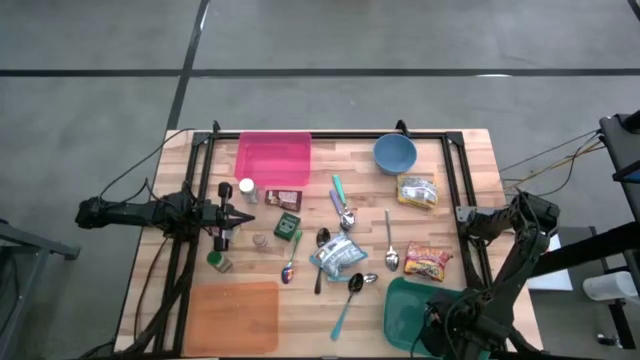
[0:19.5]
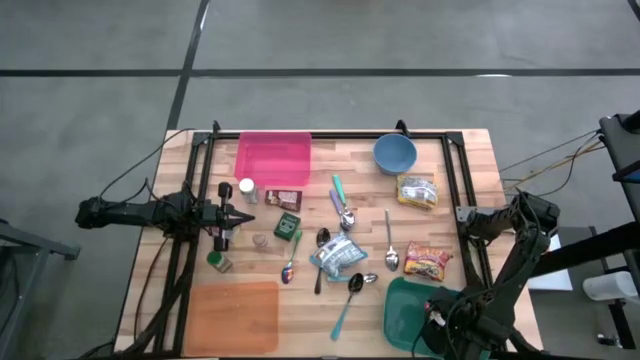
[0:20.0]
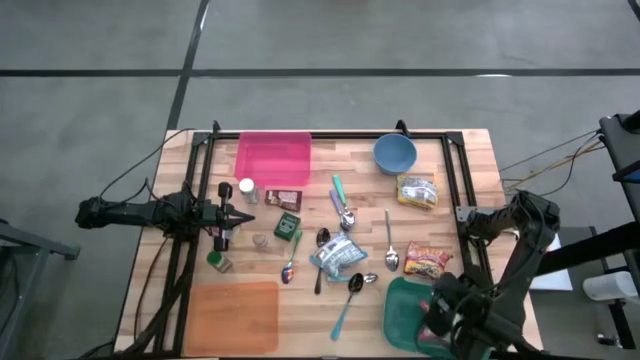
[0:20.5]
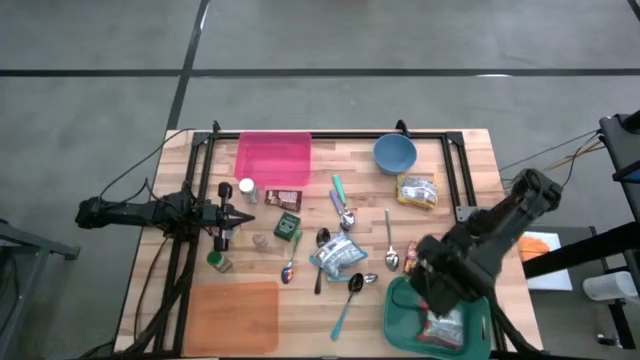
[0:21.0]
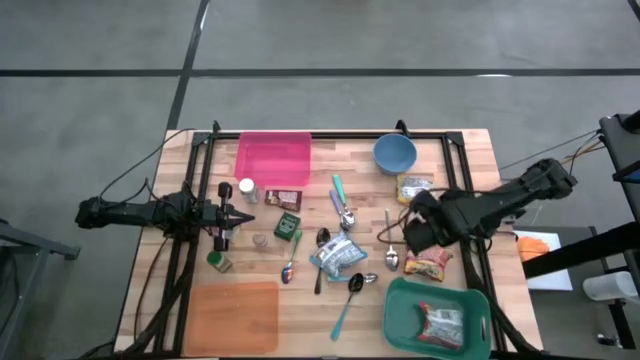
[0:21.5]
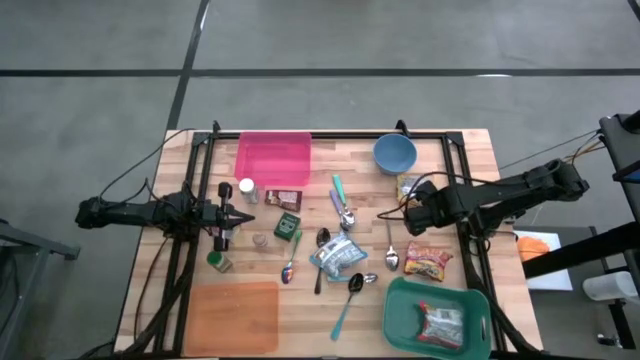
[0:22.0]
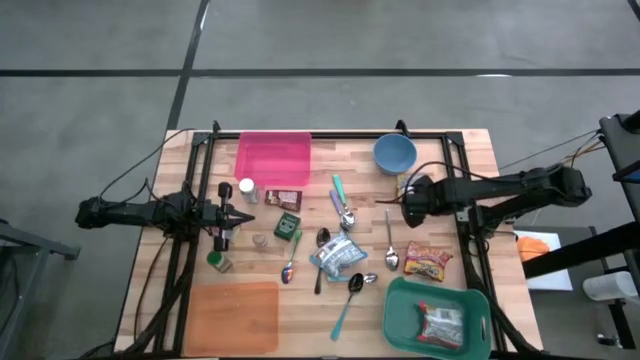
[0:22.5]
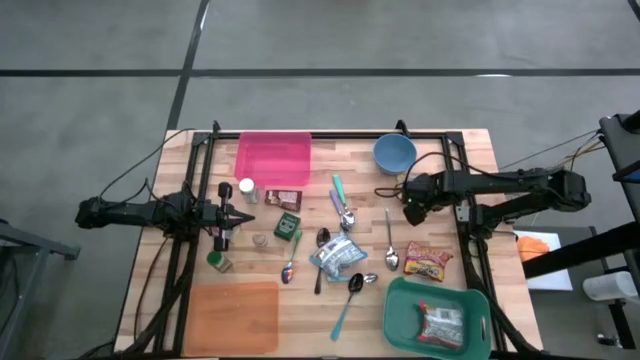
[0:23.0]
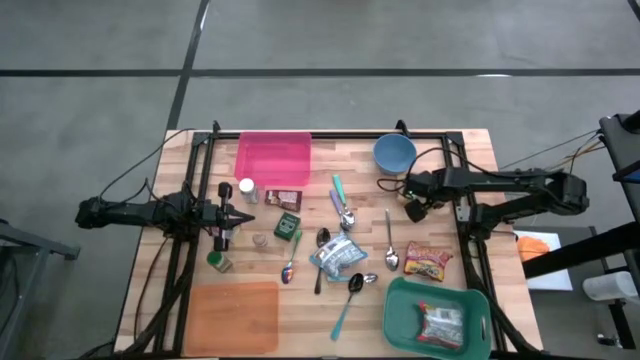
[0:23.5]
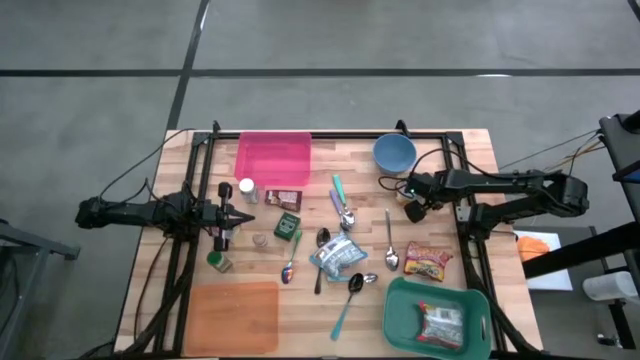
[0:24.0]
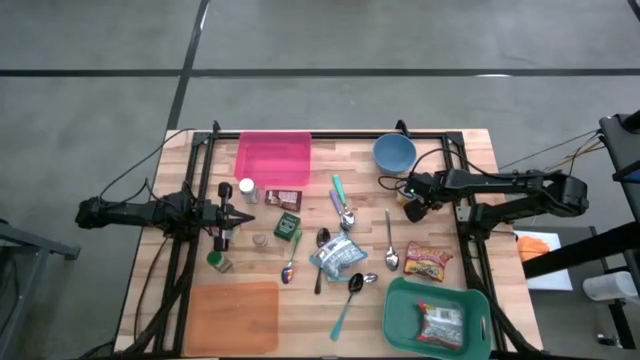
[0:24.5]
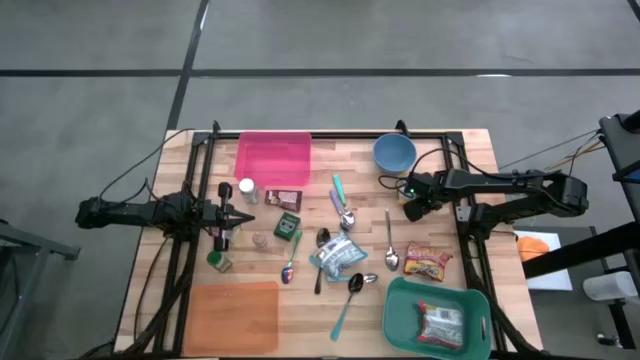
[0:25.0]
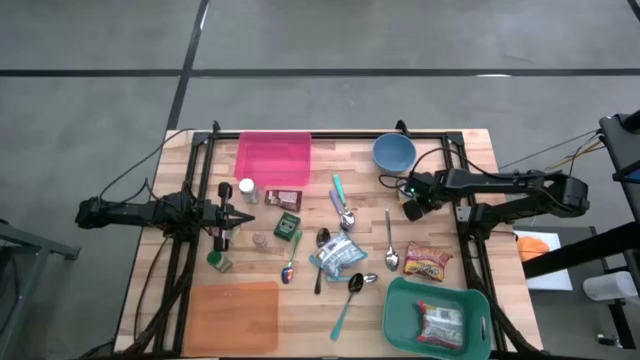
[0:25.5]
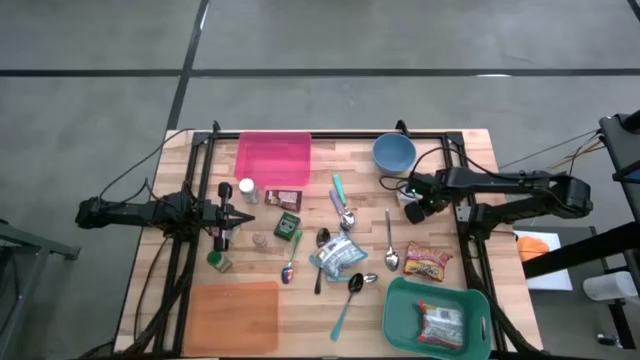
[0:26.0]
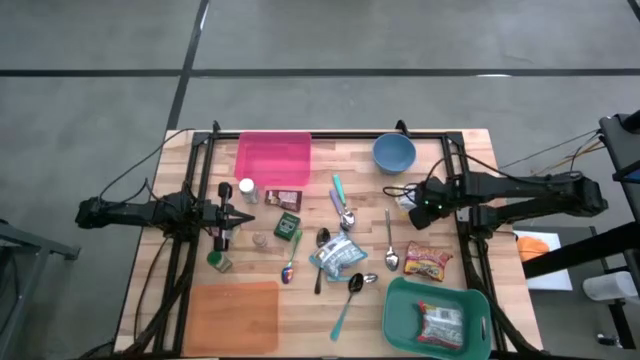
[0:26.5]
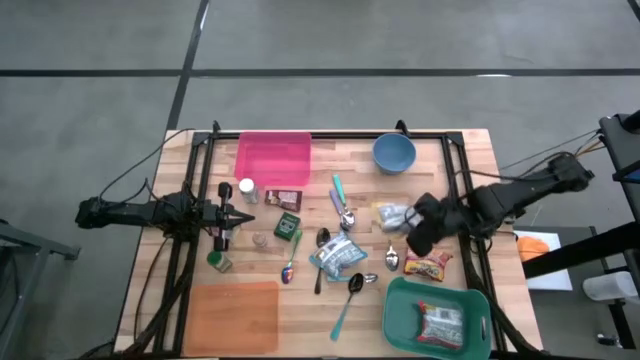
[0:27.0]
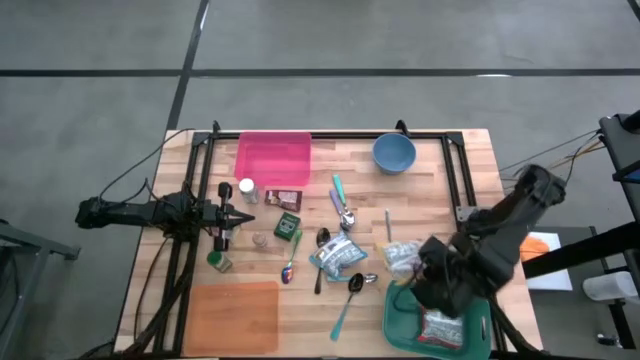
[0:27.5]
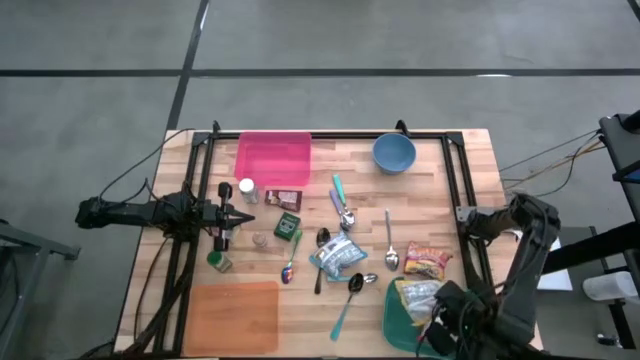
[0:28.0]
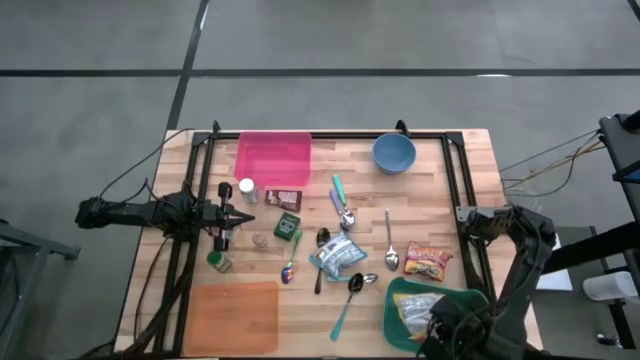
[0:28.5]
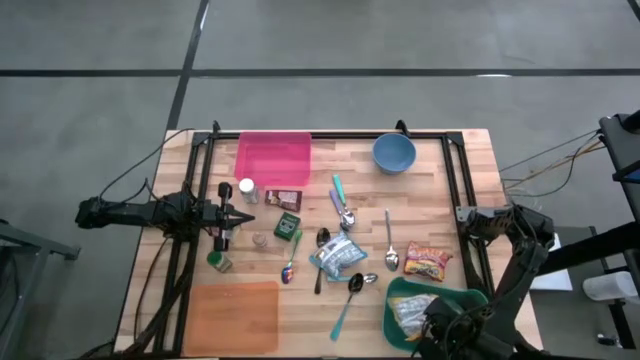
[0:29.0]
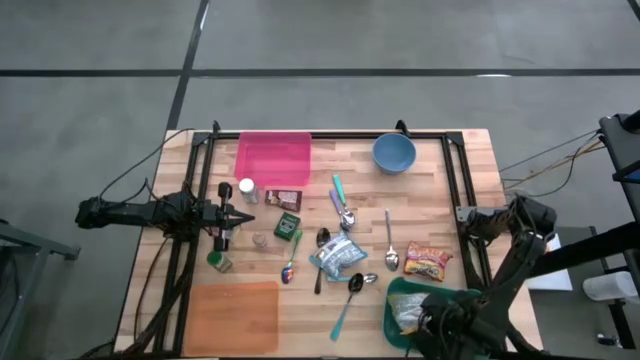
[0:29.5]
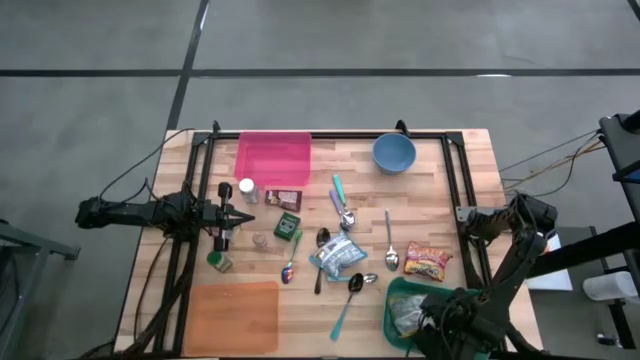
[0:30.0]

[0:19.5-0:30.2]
Put the yellow noodle pack into the green bin

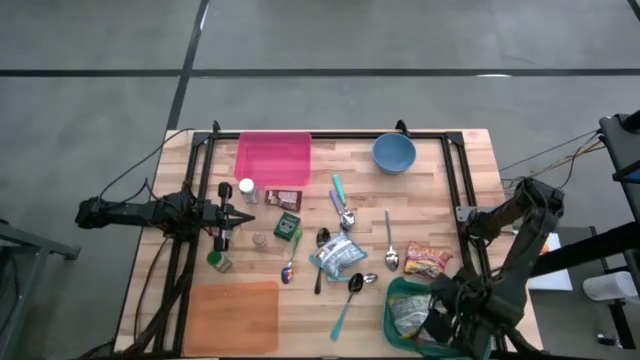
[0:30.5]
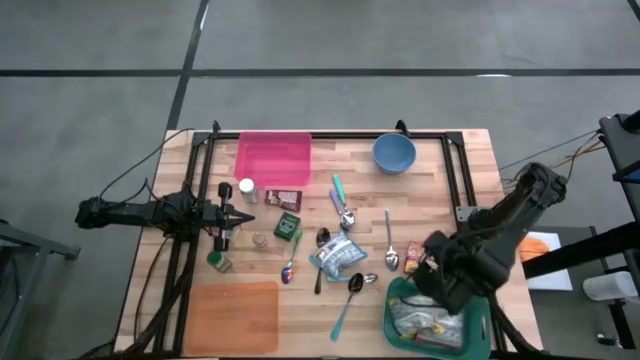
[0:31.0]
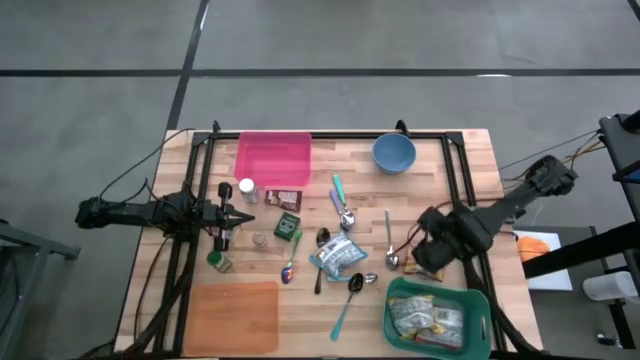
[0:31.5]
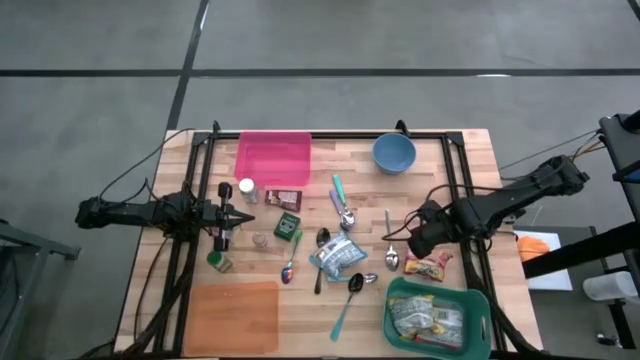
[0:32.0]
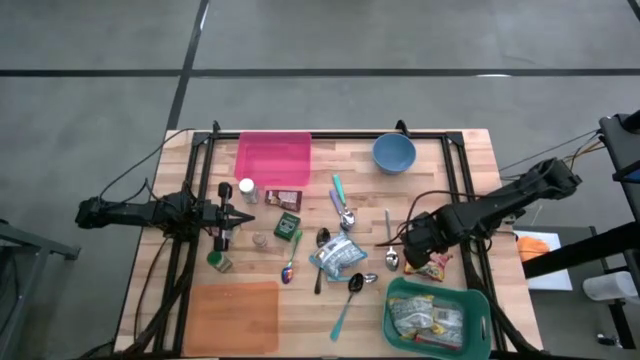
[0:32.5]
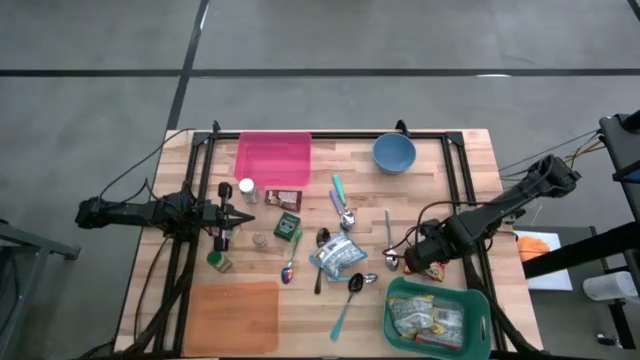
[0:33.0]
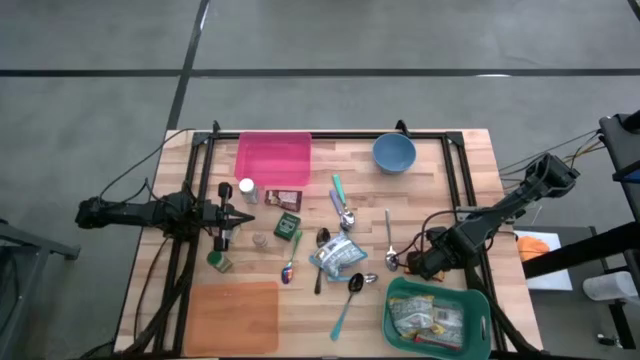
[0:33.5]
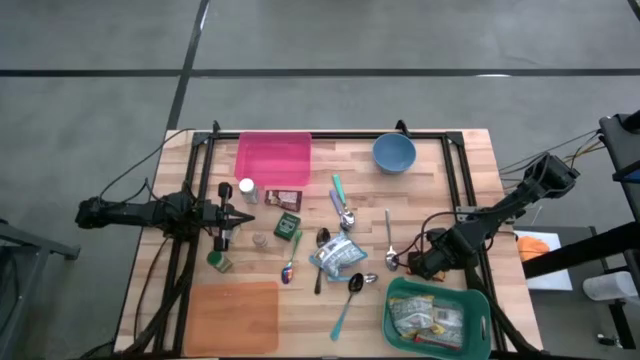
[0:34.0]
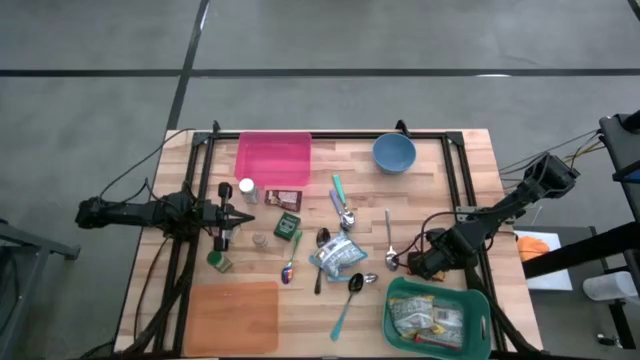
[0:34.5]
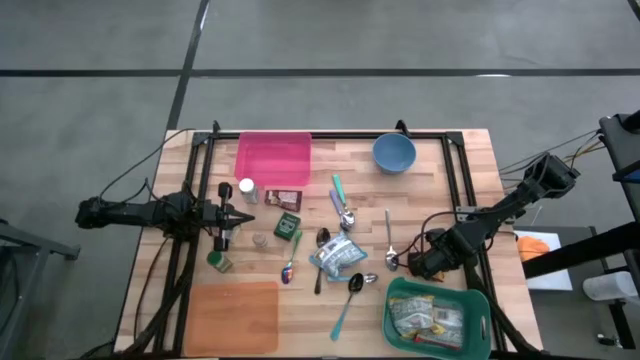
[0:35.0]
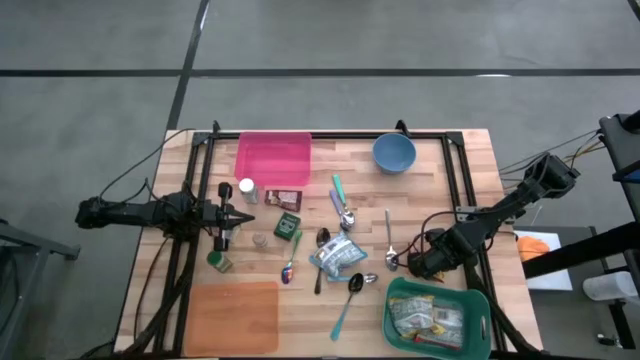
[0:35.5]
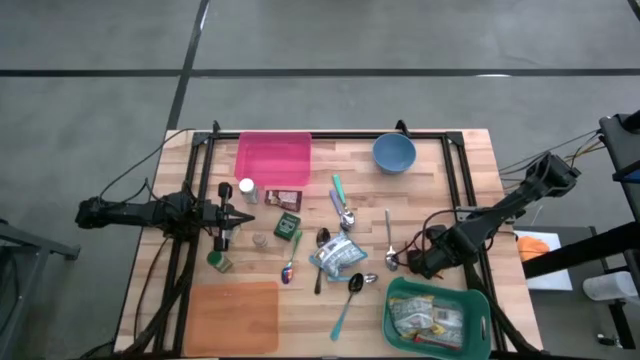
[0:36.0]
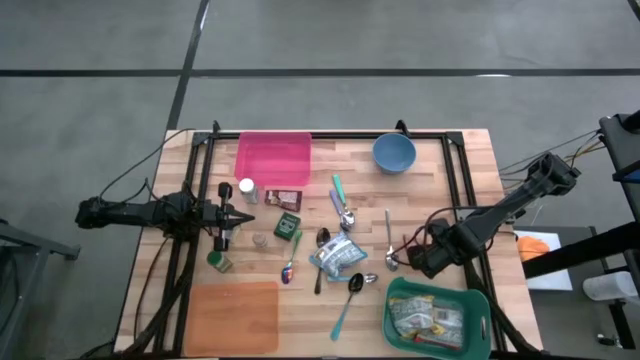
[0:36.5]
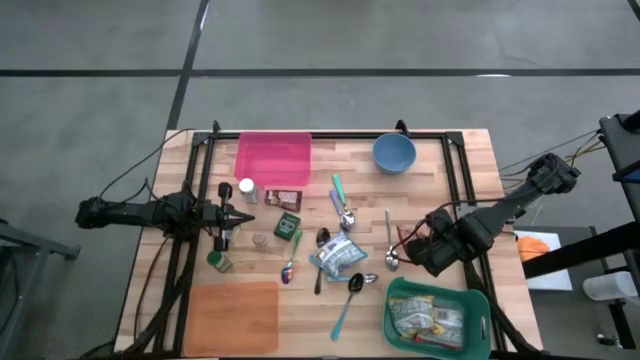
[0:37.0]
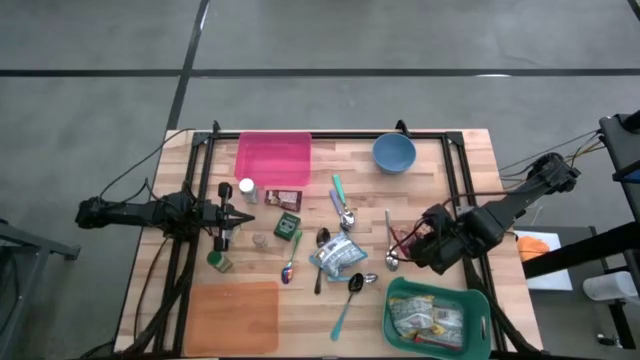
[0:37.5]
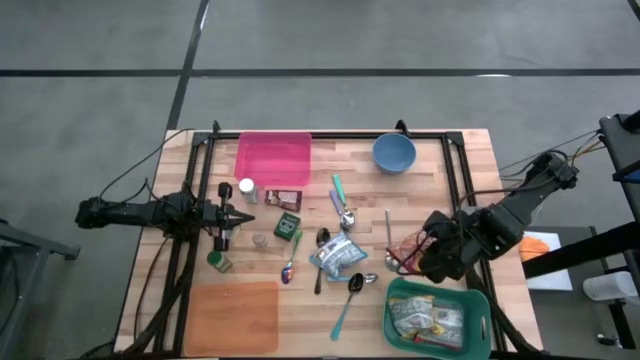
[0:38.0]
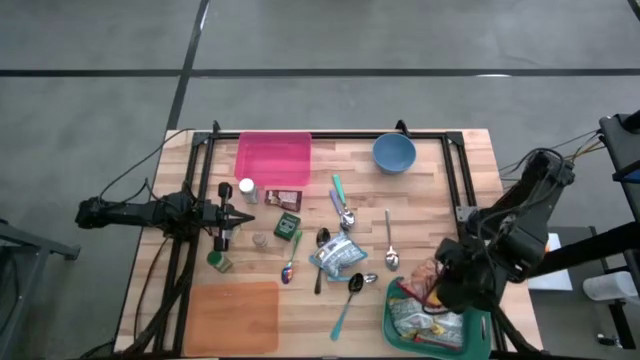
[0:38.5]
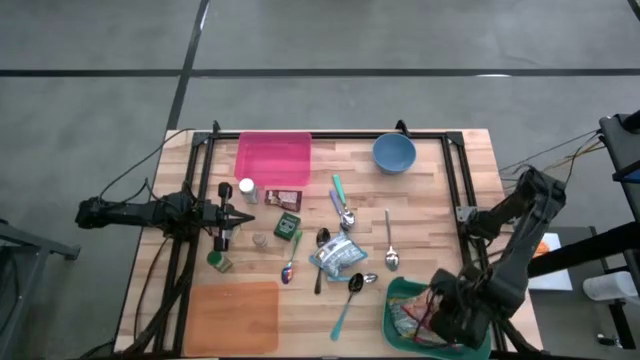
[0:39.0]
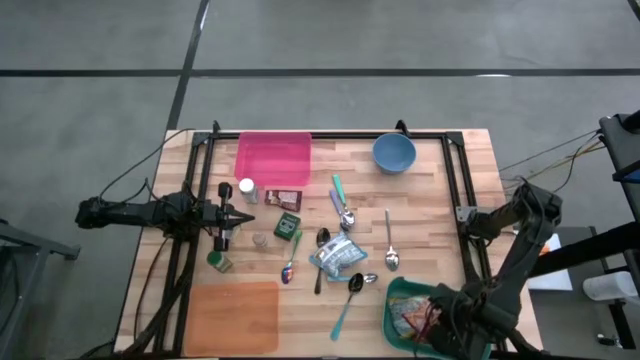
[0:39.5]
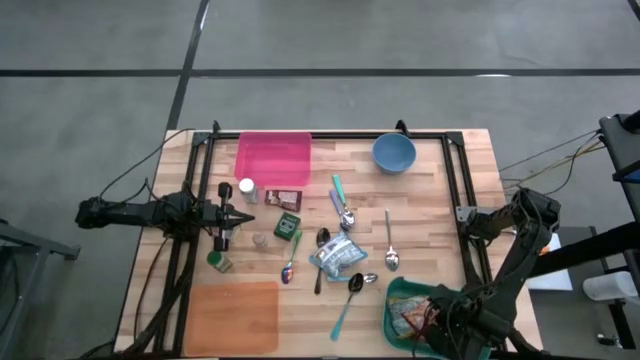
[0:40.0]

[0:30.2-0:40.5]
Put the red noodle pack into the green bin
